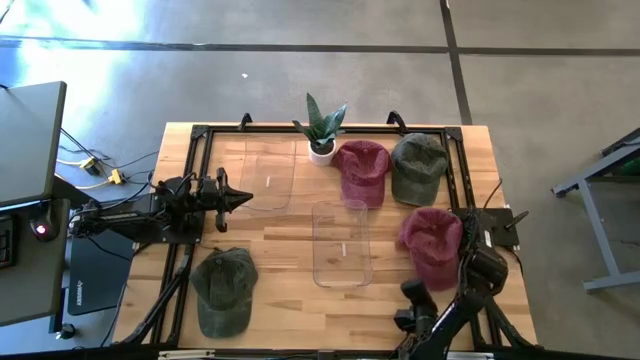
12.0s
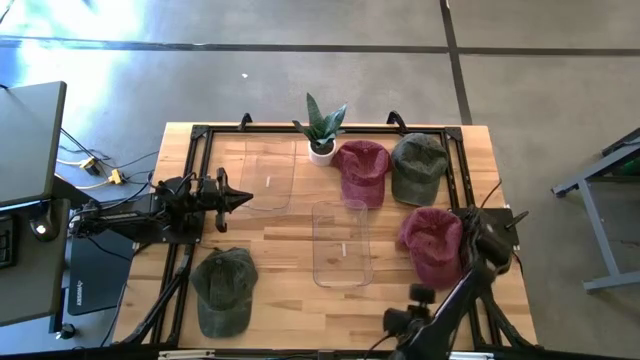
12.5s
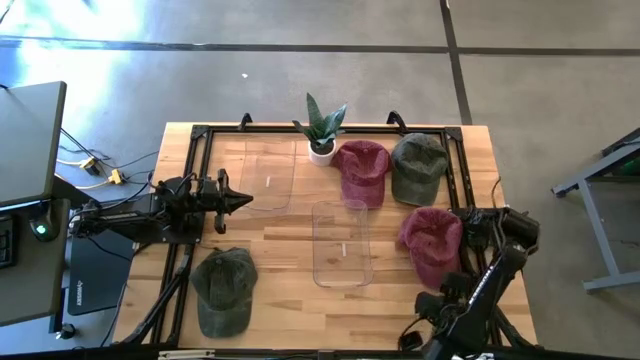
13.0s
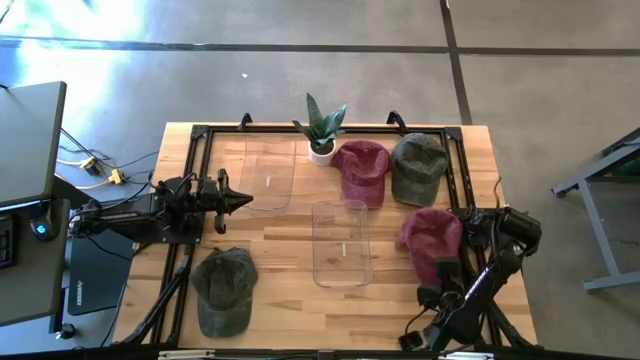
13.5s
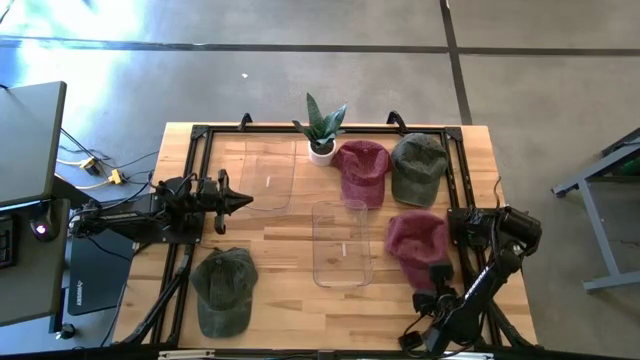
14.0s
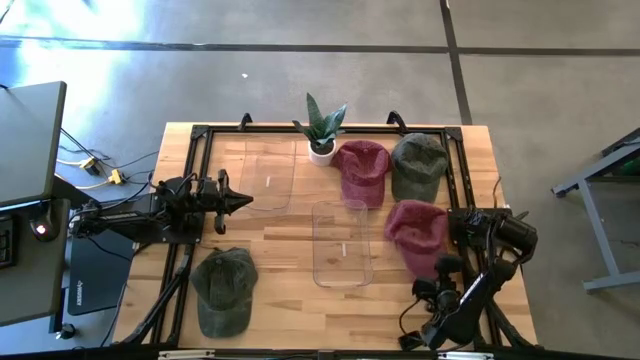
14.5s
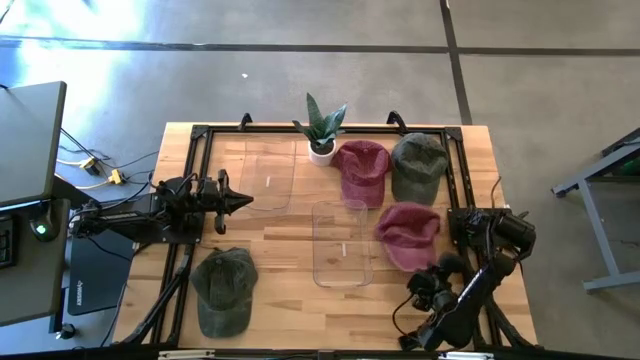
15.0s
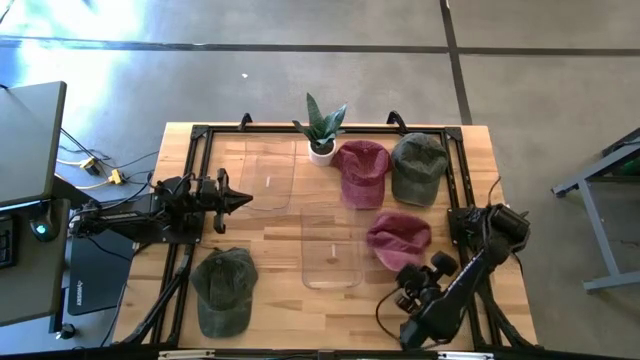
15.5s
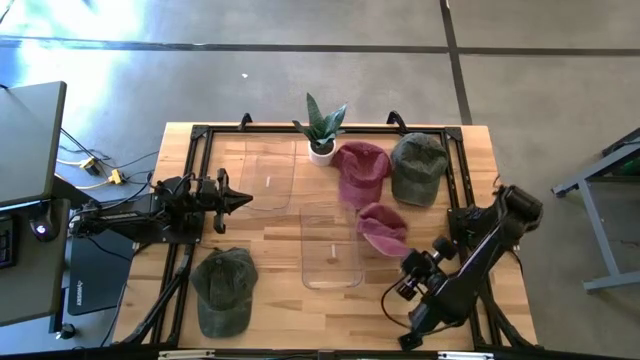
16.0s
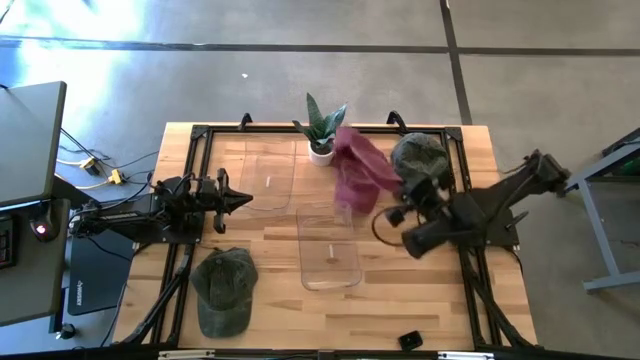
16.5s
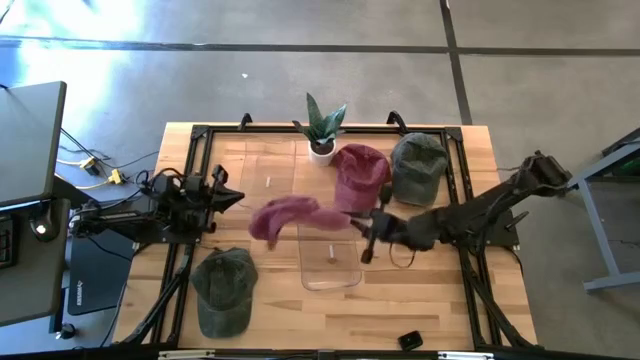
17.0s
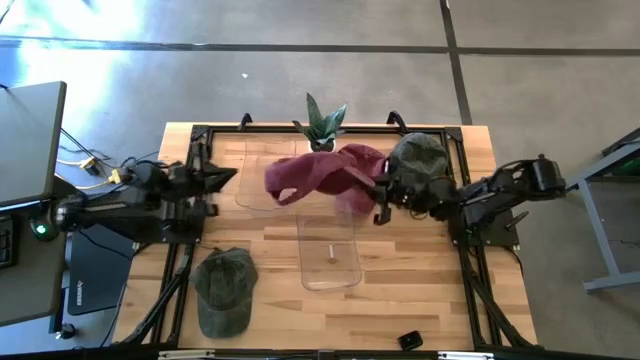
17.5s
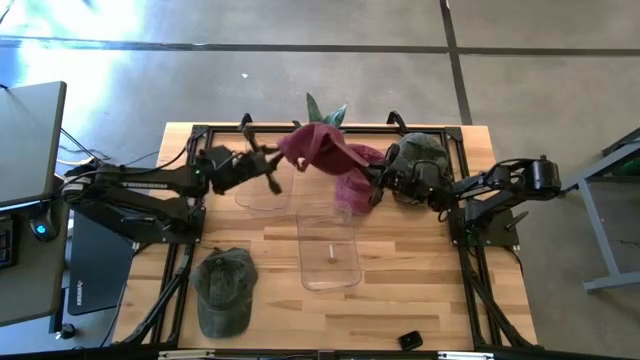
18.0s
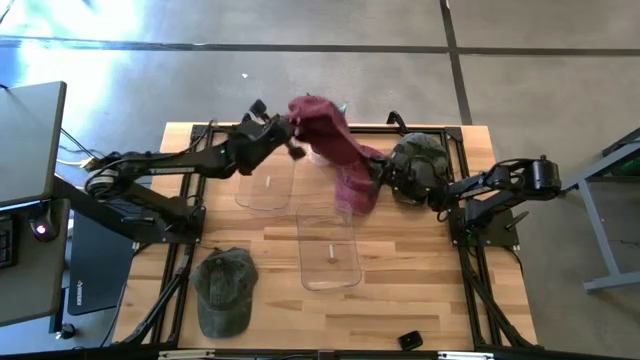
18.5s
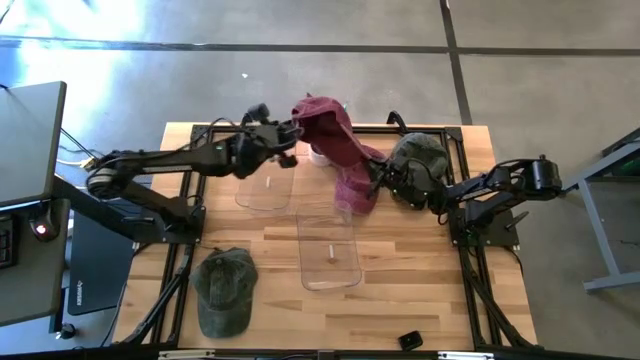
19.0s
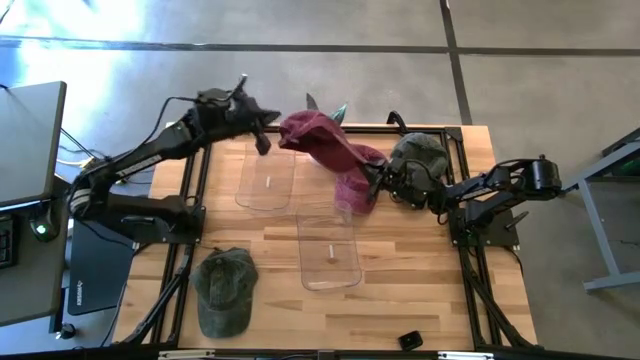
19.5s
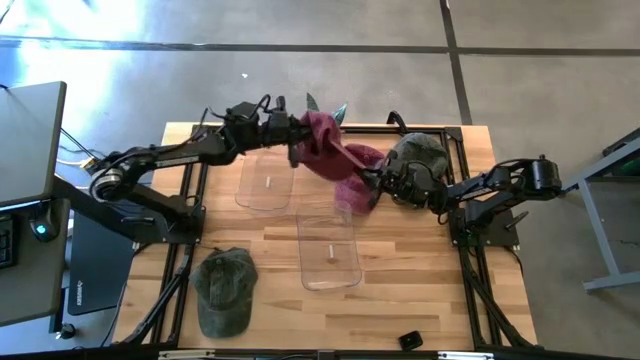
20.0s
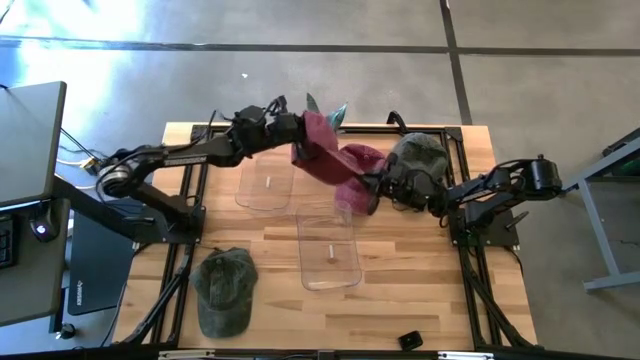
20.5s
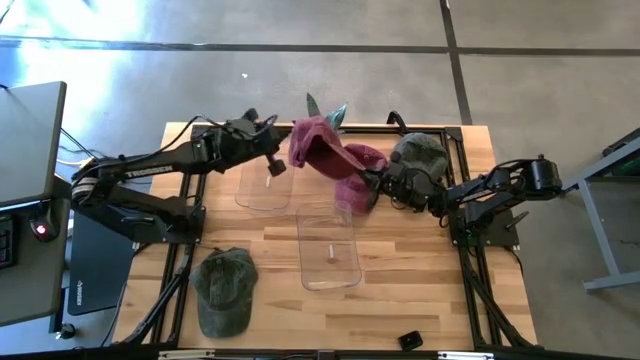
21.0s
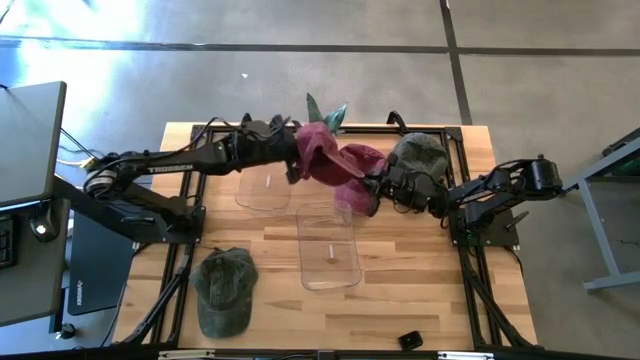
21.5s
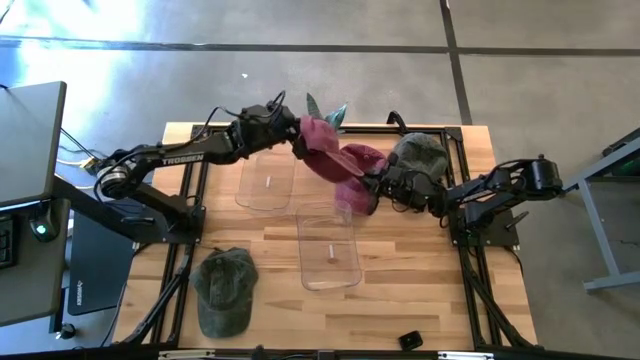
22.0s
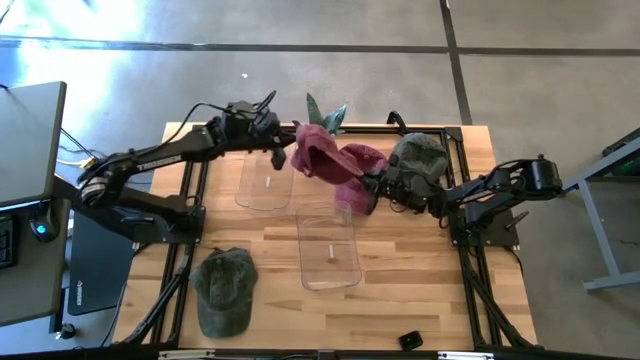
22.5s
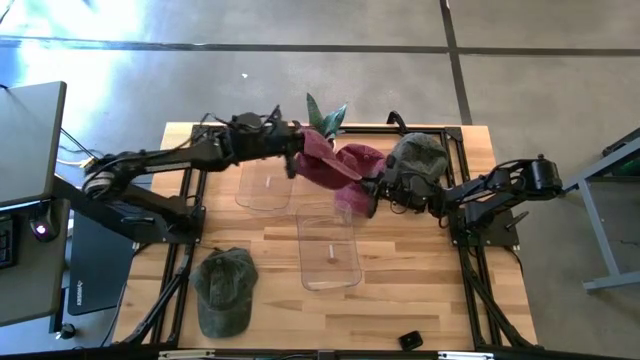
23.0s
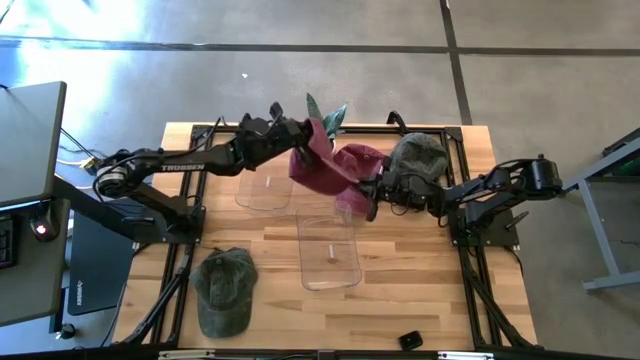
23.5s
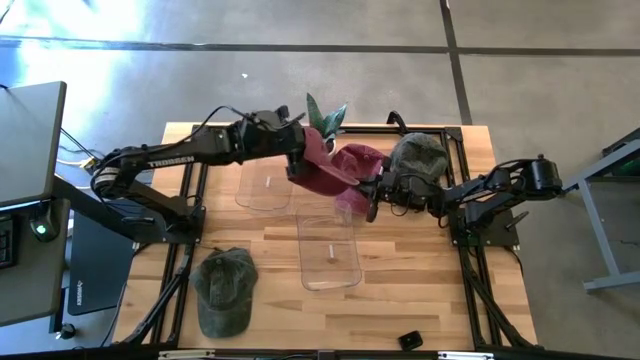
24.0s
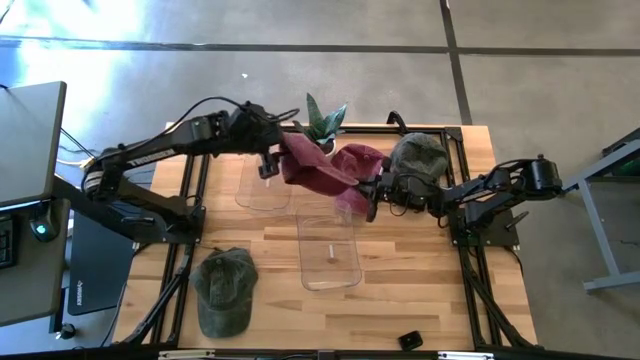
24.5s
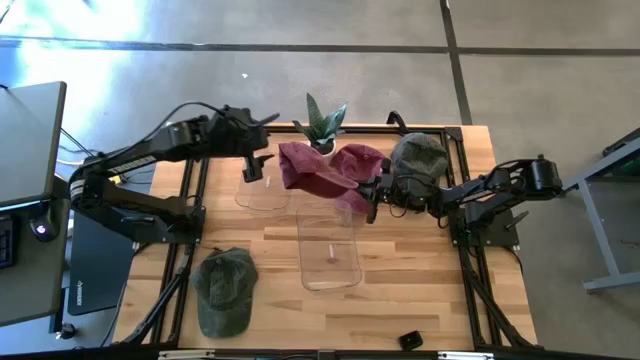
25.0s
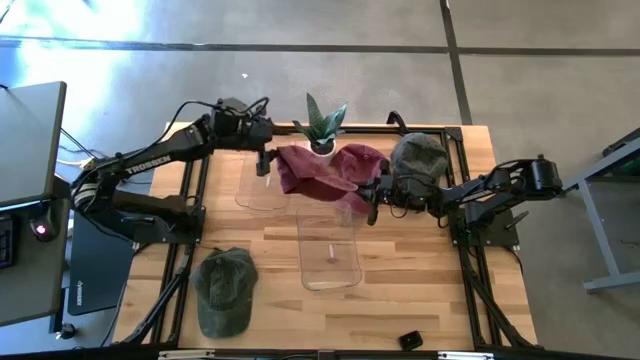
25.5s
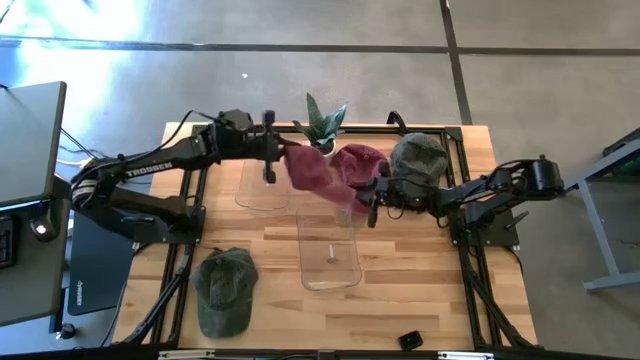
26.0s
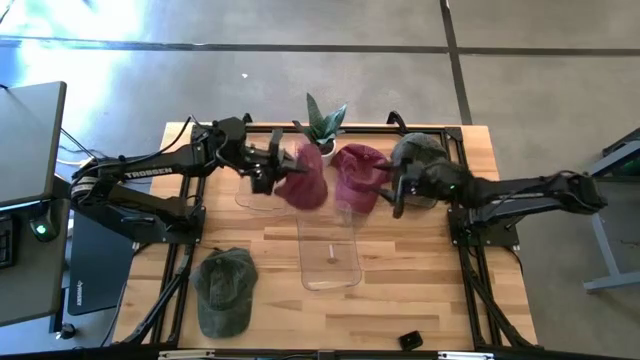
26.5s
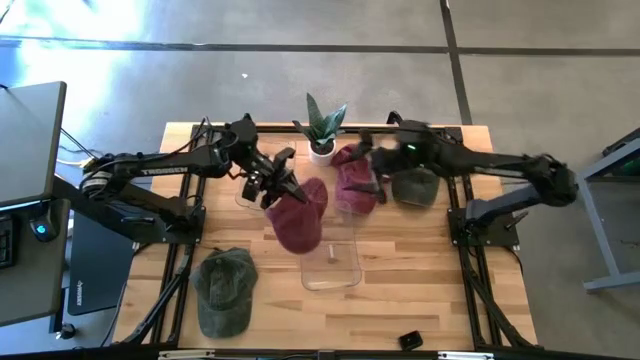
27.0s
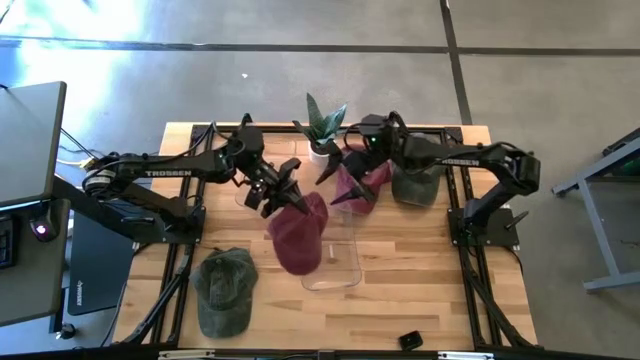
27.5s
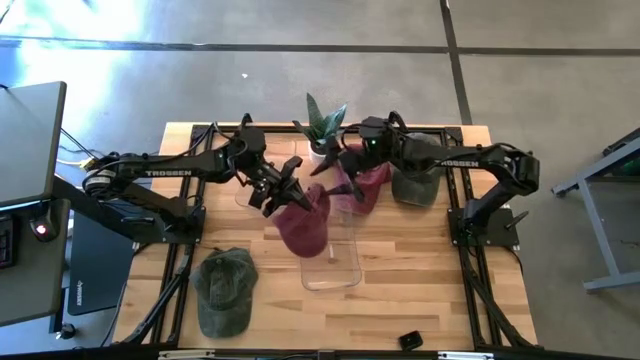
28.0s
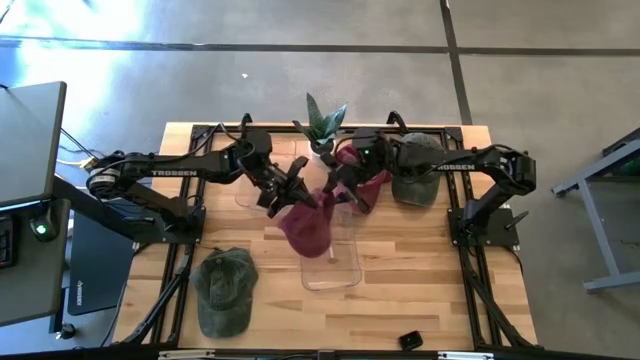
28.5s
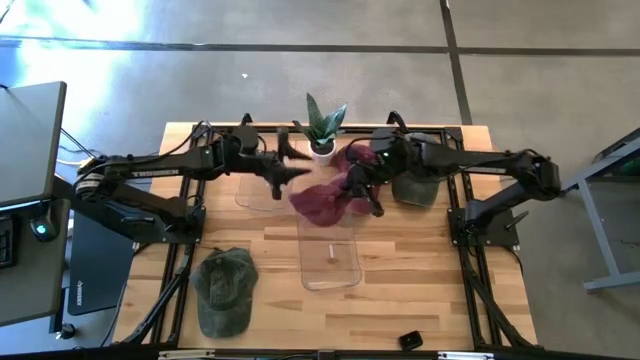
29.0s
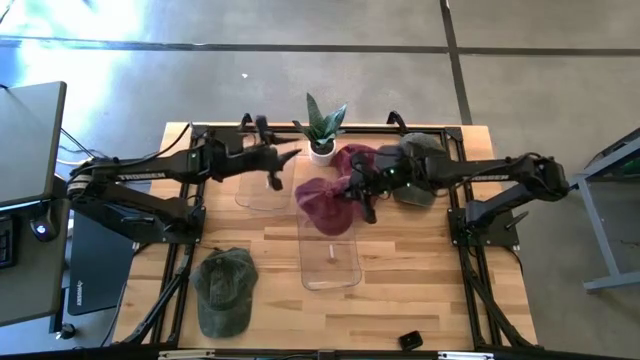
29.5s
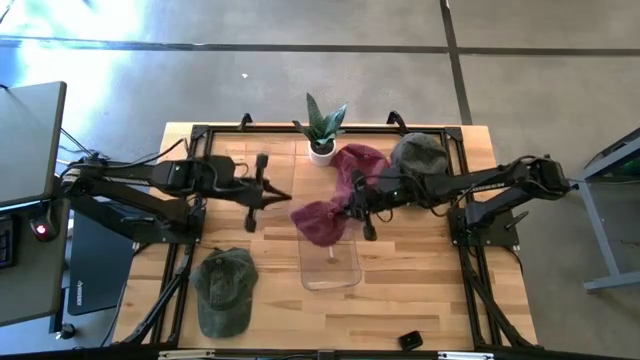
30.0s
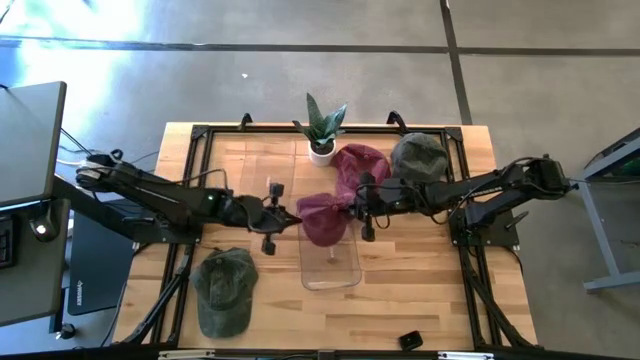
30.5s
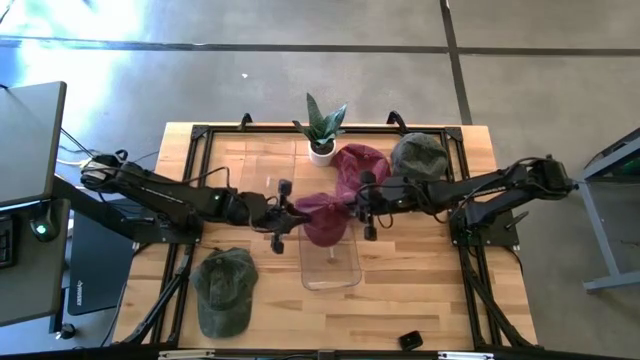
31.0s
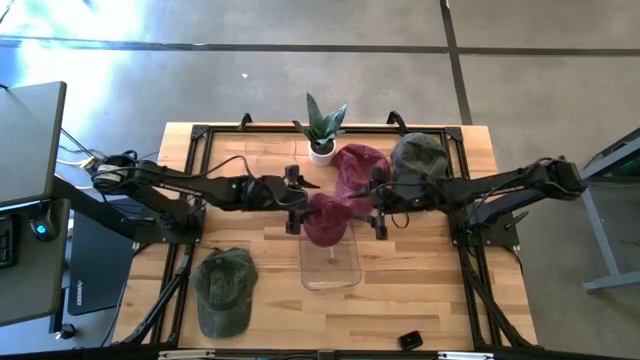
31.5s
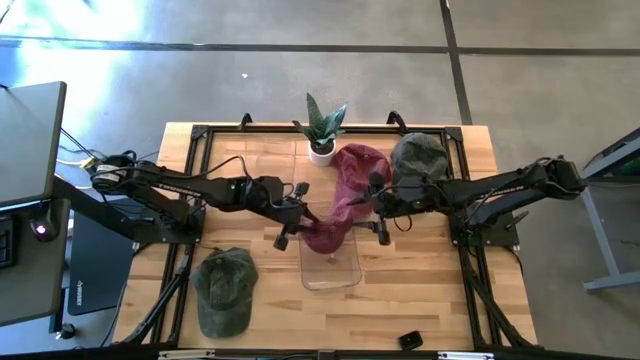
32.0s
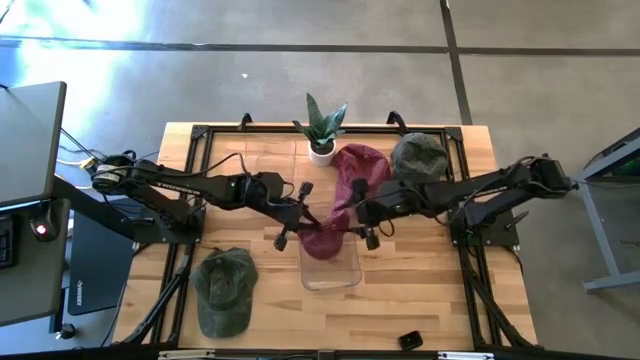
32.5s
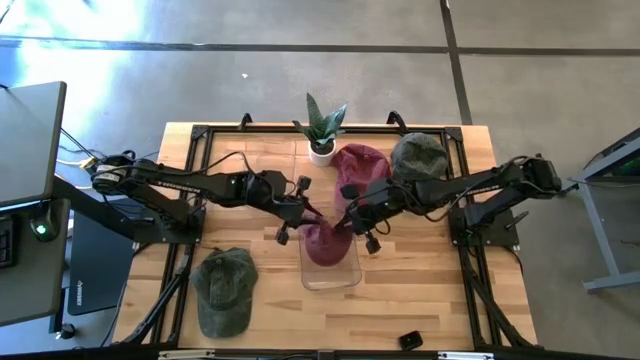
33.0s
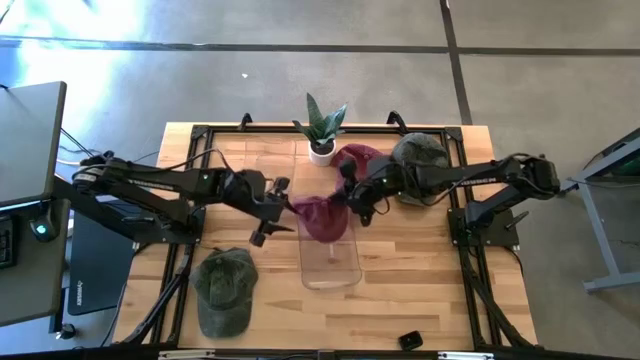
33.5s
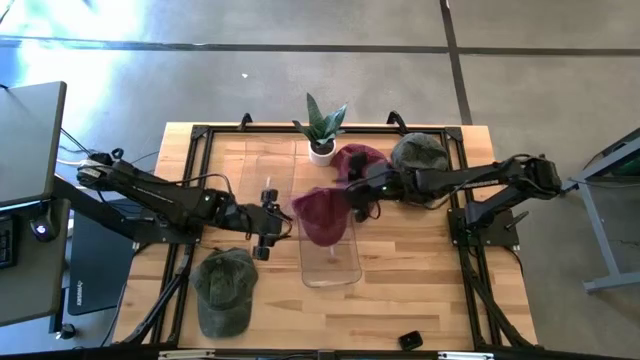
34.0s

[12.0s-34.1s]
Task: Pick & Place hat
Put the bottom red cap into the bottom transparent bin
